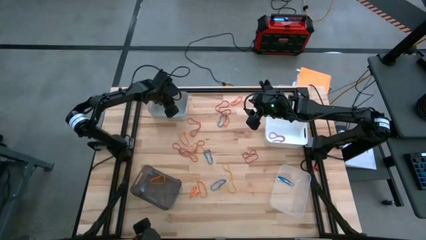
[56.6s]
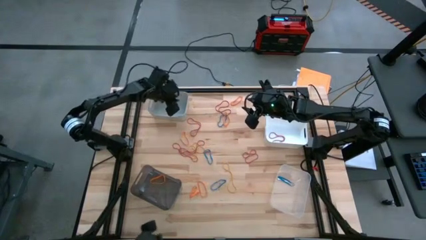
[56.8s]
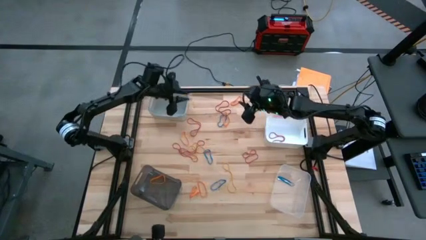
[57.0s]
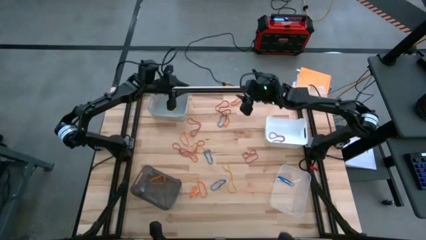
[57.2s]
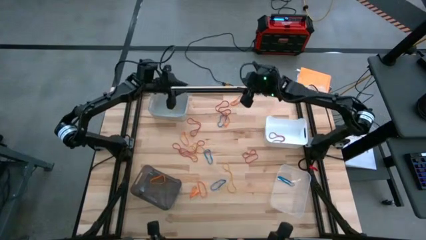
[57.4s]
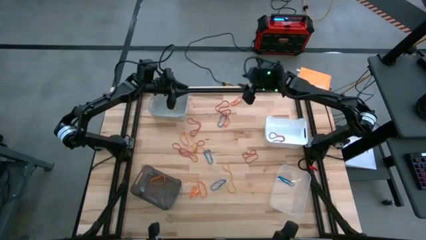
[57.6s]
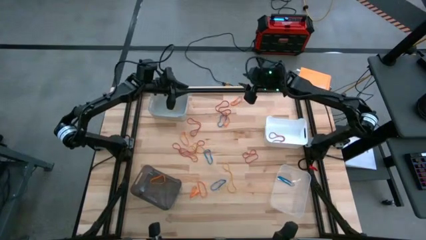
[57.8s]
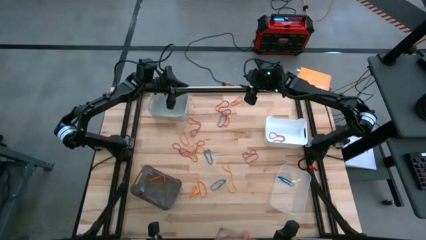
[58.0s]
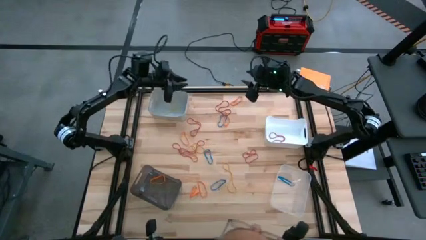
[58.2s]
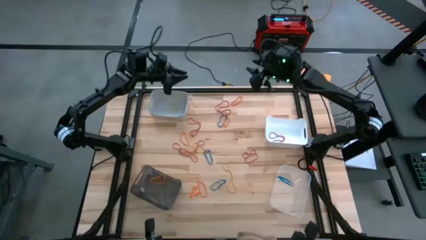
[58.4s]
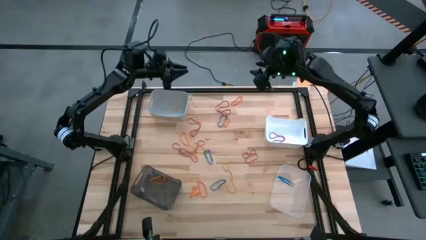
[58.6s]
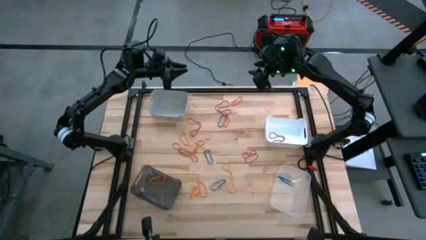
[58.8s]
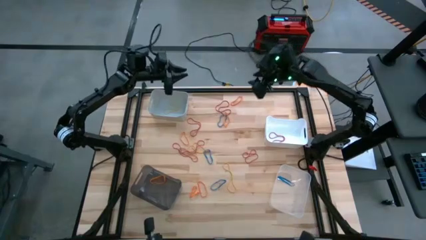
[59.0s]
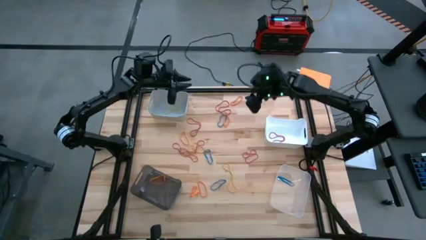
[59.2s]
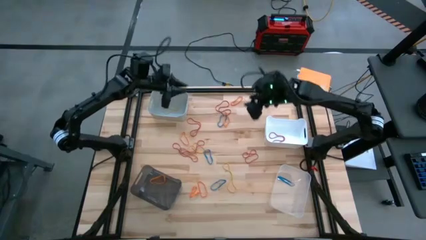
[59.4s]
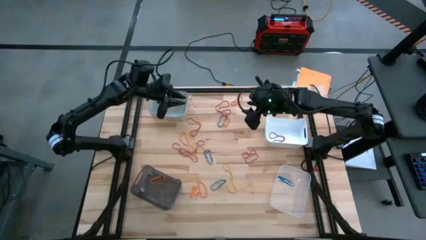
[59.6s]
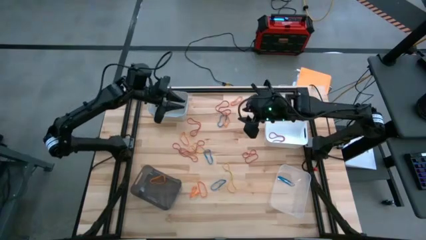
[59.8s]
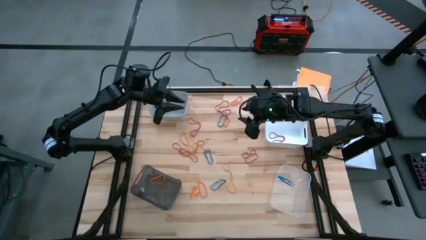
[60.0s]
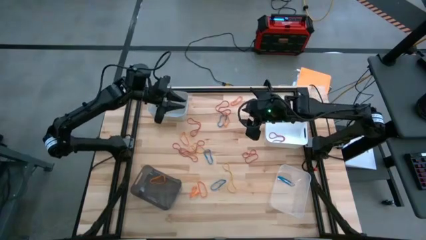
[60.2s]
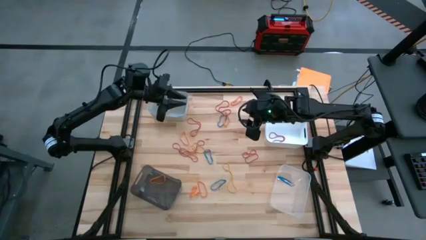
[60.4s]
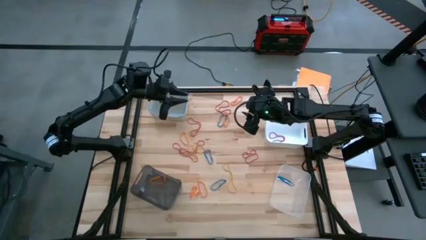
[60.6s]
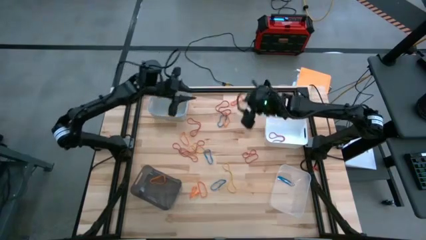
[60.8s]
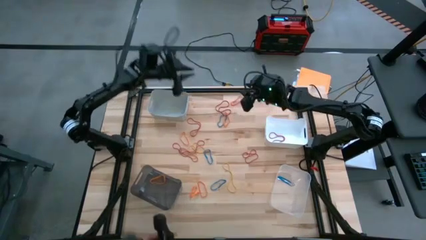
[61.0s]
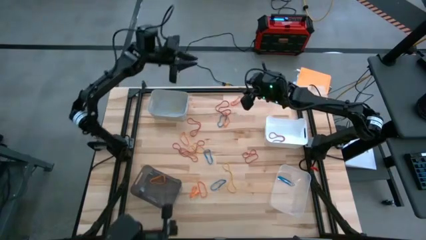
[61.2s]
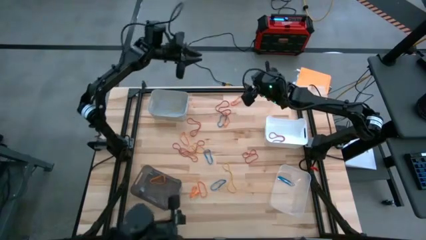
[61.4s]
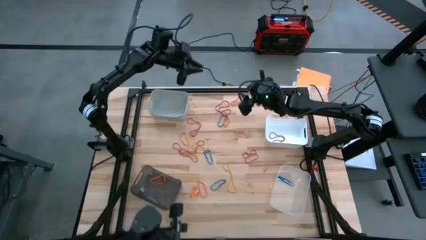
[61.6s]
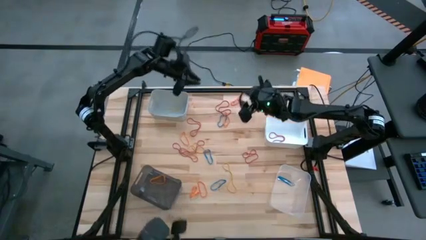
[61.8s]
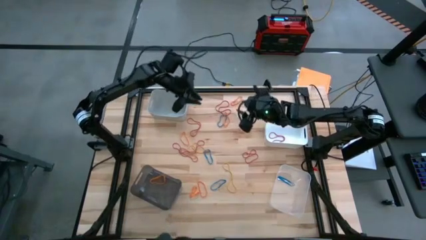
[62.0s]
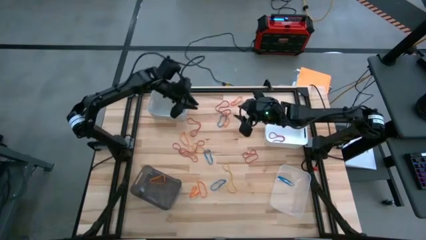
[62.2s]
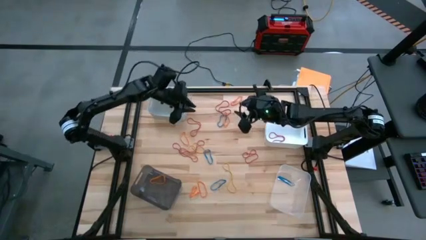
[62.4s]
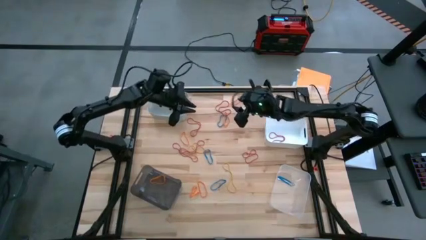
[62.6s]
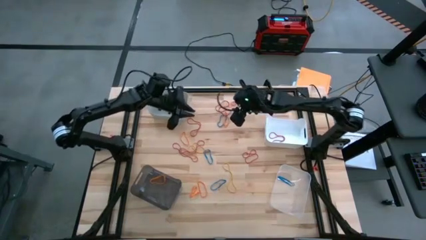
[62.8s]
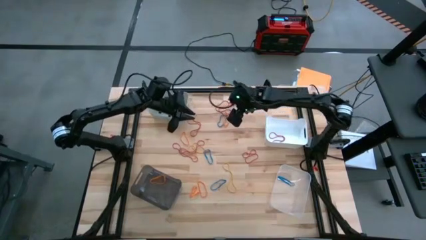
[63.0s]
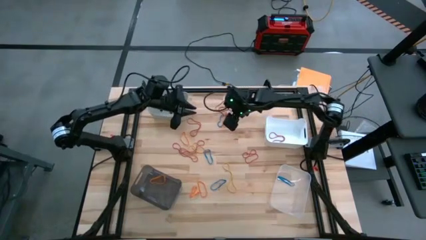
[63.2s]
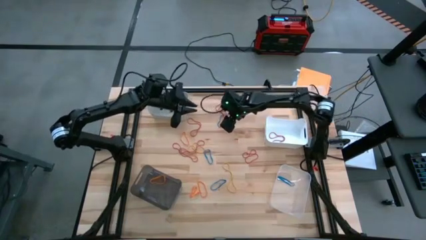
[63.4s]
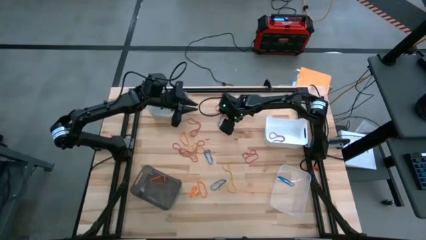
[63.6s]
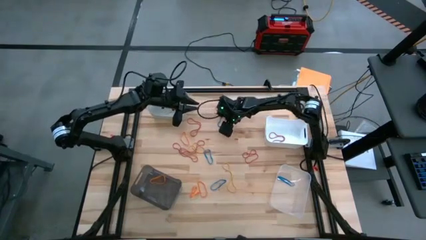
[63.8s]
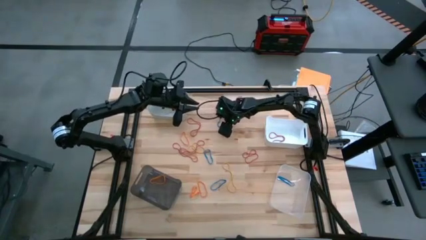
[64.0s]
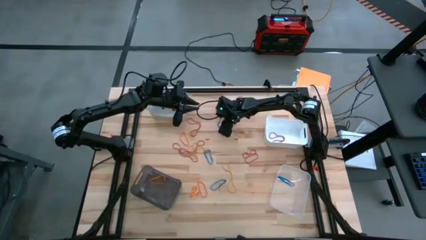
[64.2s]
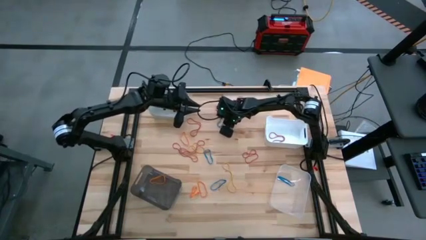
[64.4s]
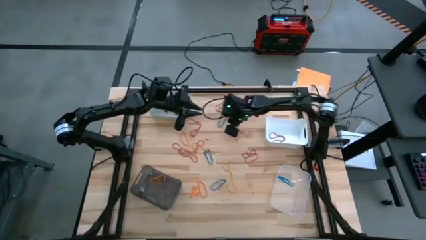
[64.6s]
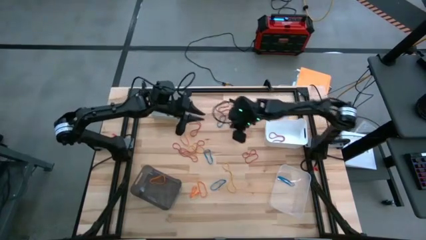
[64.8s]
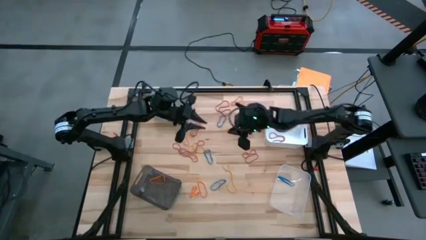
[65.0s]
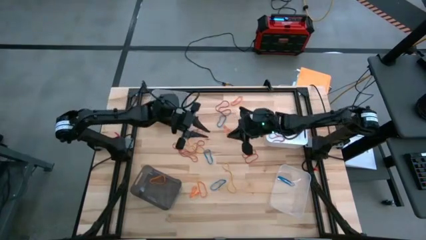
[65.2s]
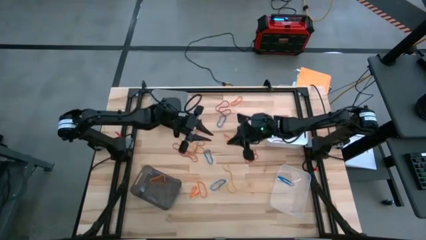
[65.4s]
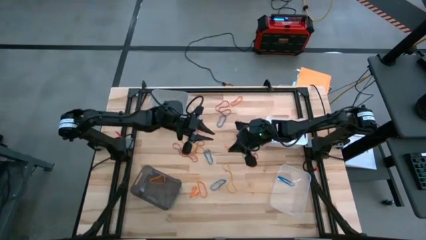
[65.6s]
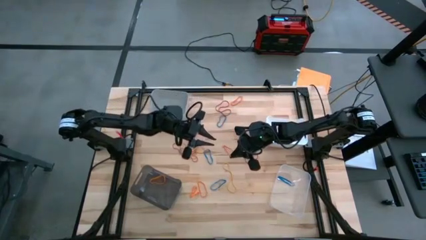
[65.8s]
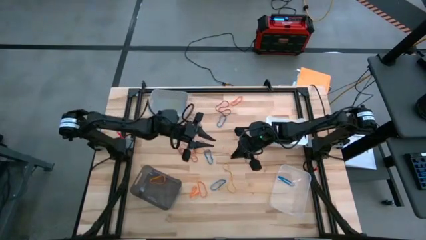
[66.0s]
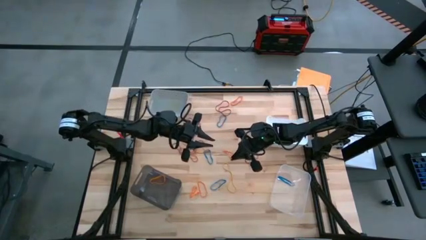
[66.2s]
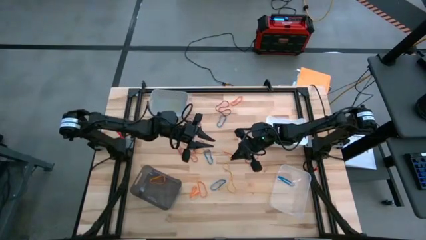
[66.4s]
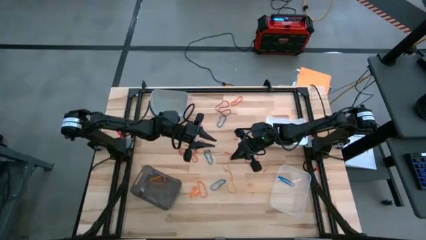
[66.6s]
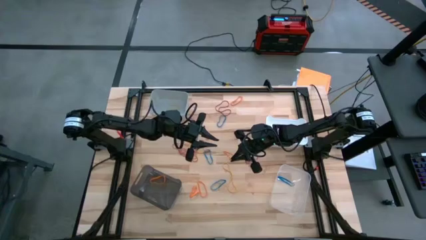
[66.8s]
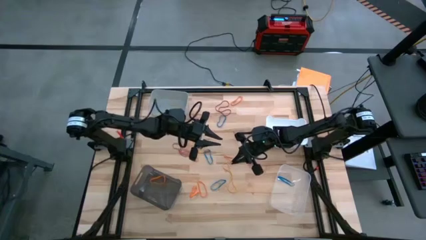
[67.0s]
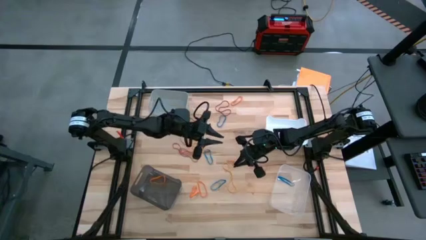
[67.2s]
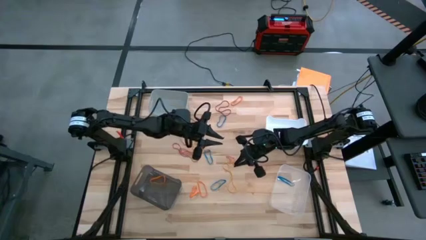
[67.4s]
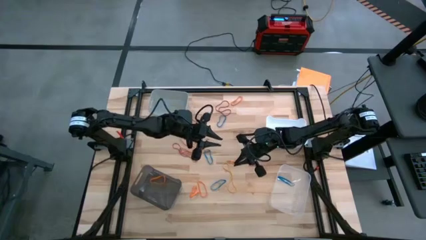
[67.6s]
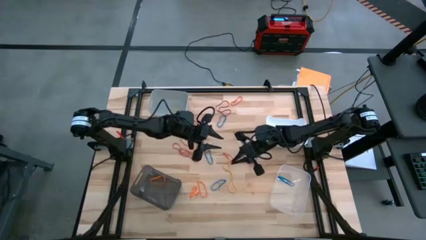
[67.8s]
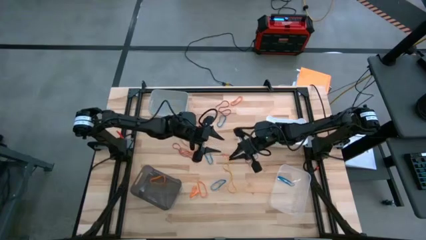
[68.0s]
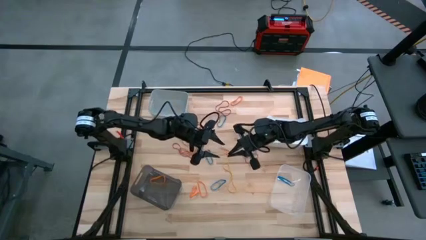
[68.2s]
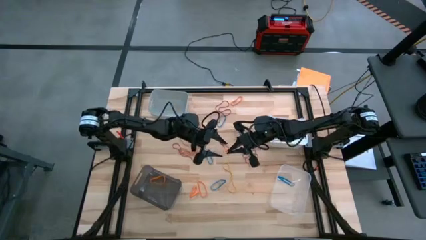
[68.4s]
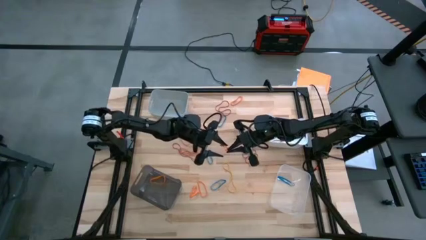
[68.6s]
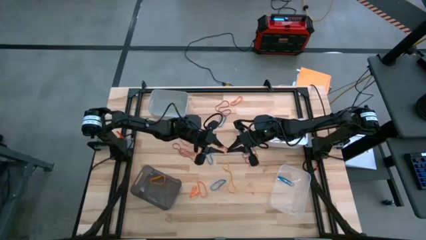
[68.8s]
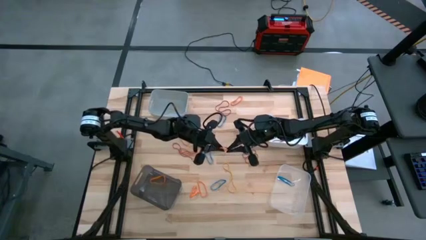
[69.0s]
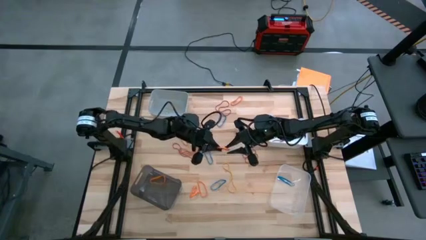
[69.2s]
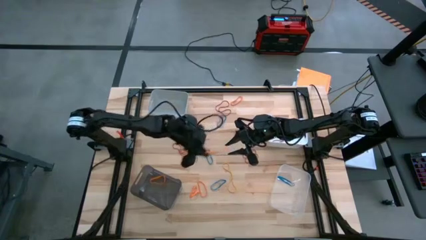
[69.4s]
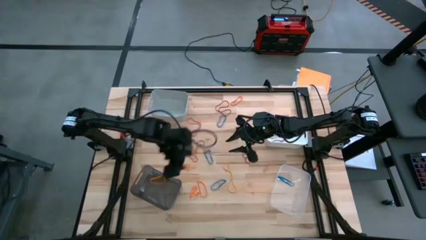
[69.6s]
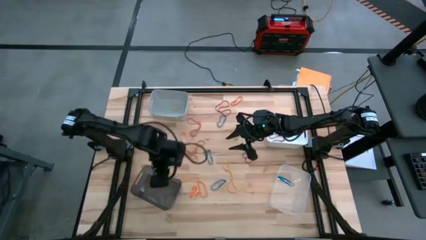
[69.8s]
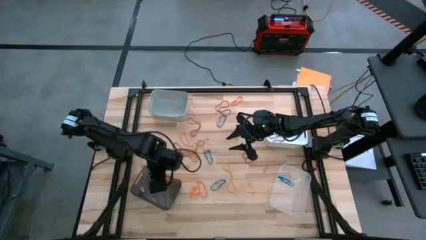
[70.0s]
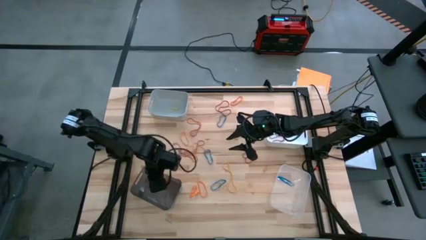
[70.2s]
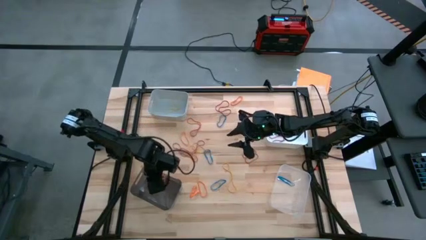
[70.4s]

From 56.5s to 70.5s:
Task: Sort rubber bands into baskets
Put the orange rubber band into the black bin

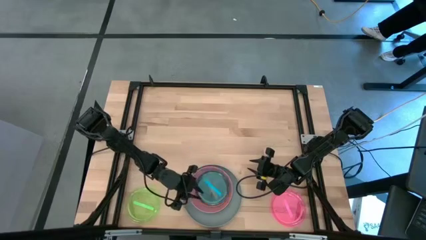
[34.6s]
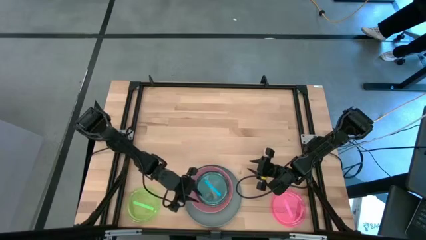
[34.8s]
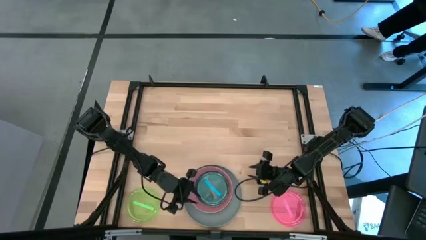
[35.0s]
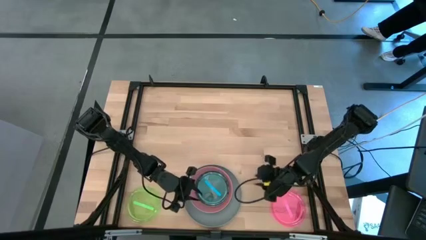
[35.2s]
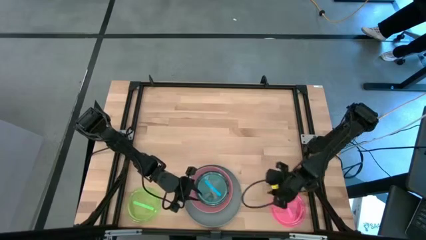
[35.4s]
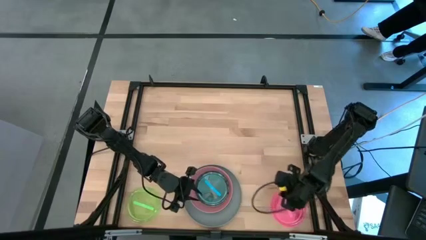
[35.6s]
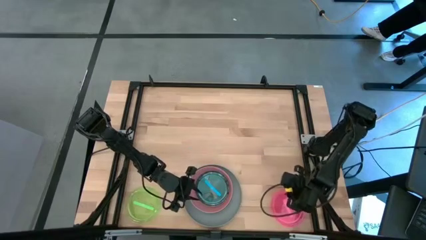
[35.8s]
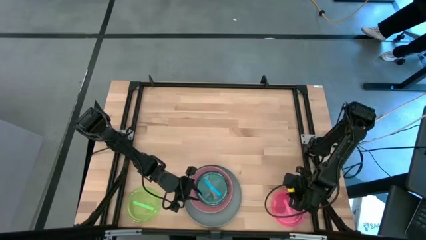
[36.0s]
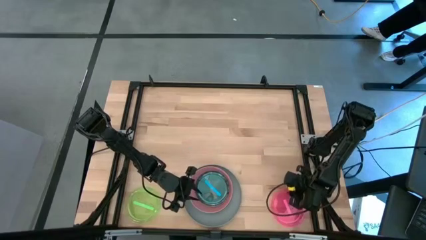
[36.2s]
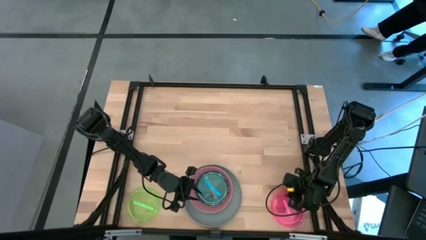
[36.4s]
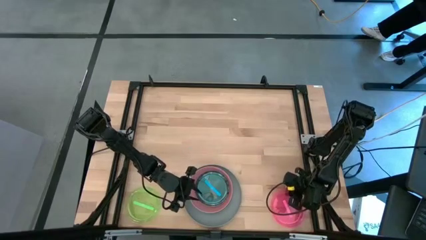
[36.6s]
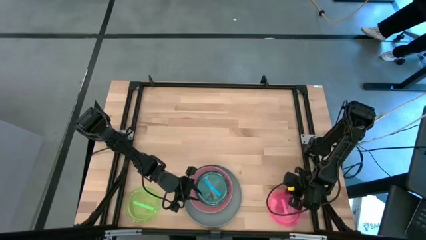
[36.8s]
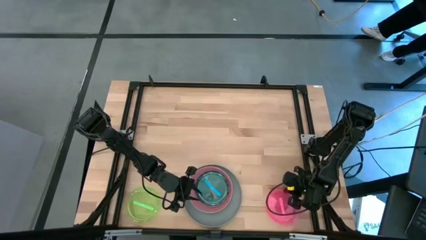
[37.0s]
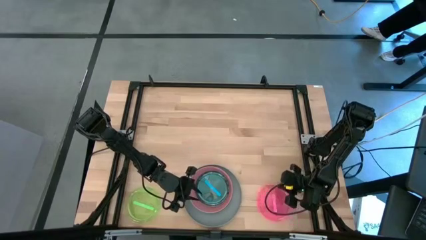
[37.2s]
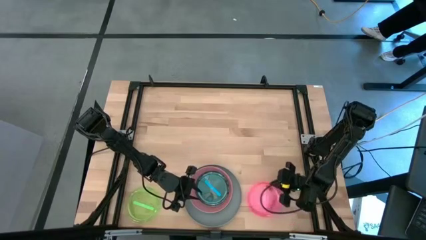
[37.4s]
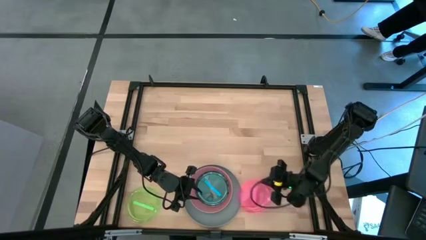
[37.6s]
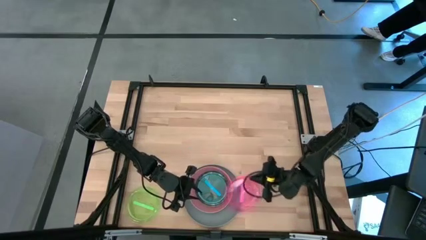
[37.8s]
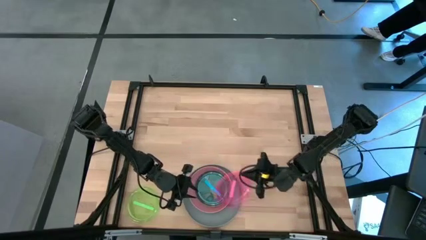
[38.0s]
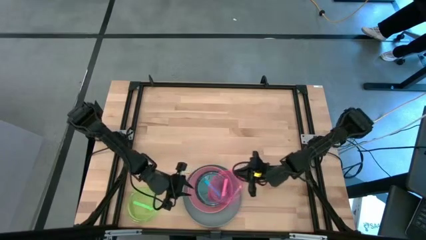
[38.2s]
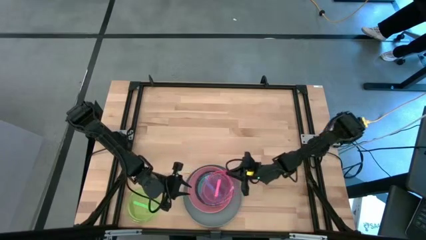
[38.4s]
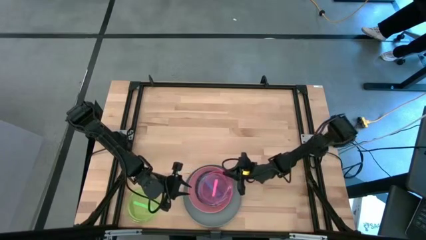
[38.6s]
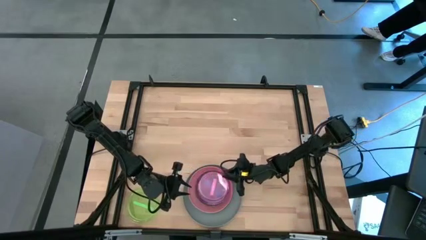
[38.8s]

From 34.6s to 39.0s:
Task: Stack plastic plates
Stack the pink plate on top of blue plate
